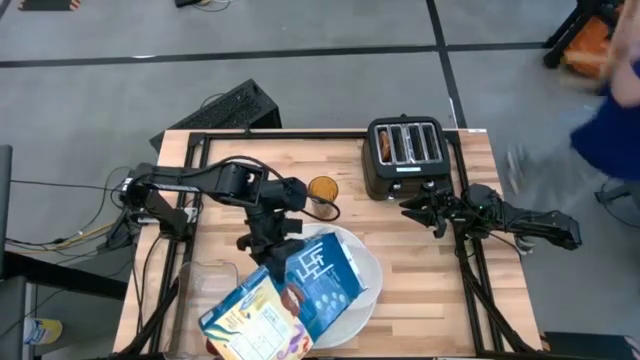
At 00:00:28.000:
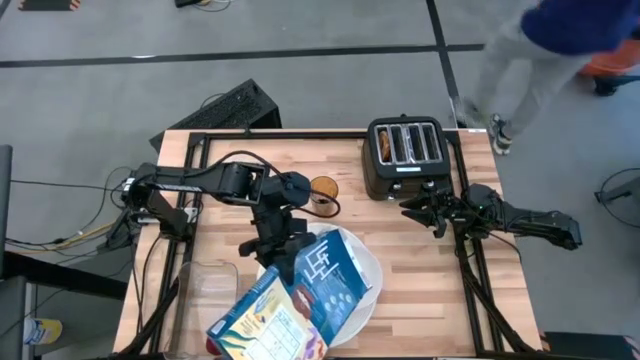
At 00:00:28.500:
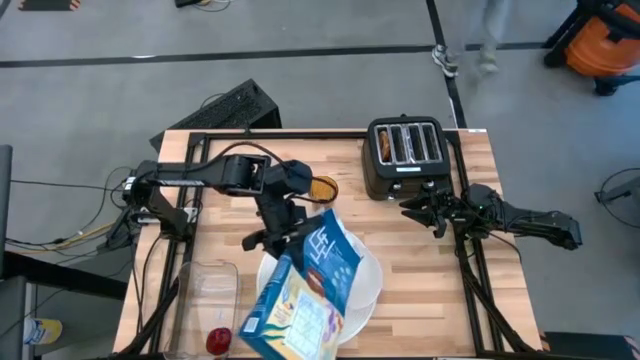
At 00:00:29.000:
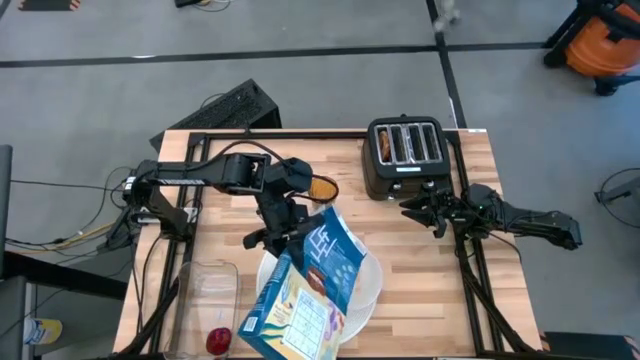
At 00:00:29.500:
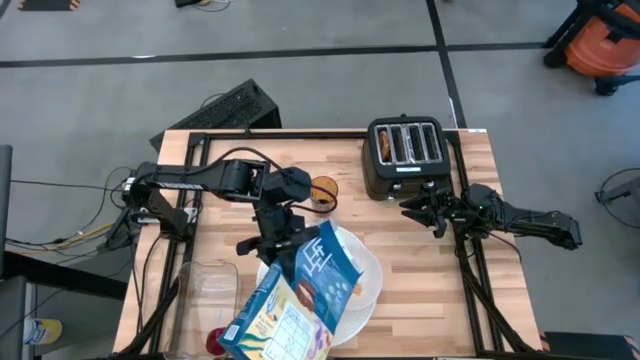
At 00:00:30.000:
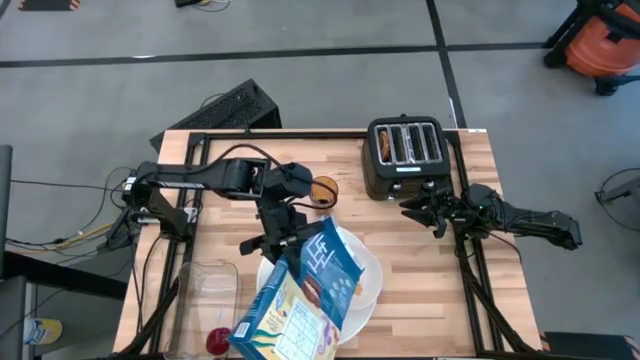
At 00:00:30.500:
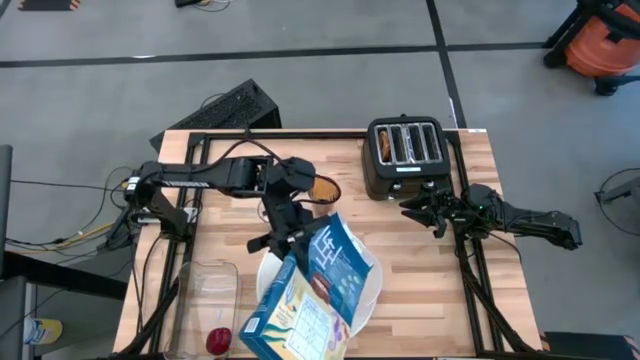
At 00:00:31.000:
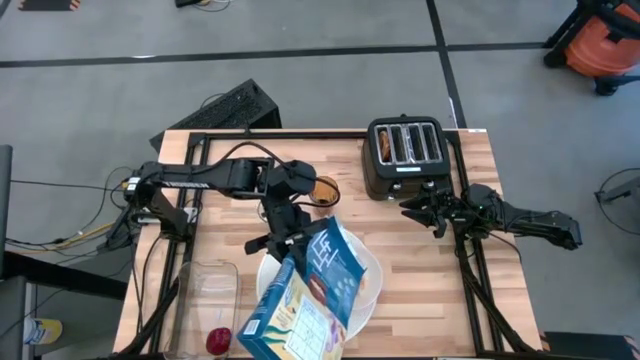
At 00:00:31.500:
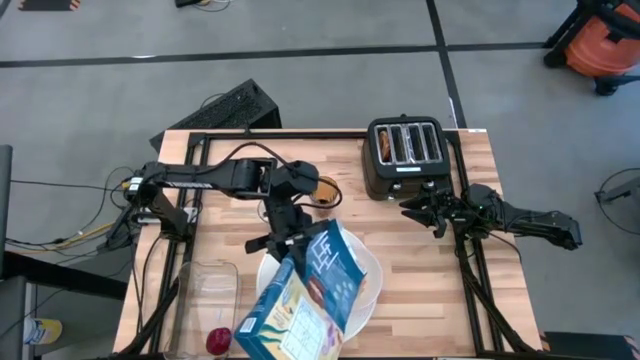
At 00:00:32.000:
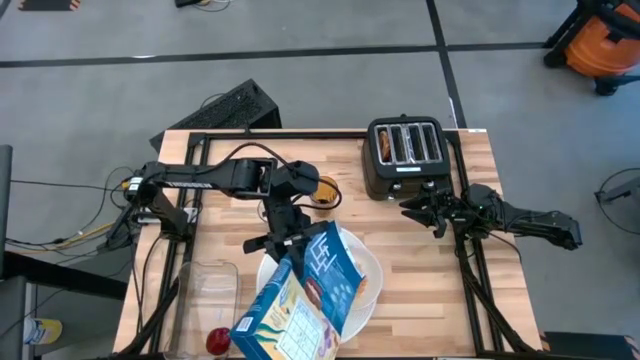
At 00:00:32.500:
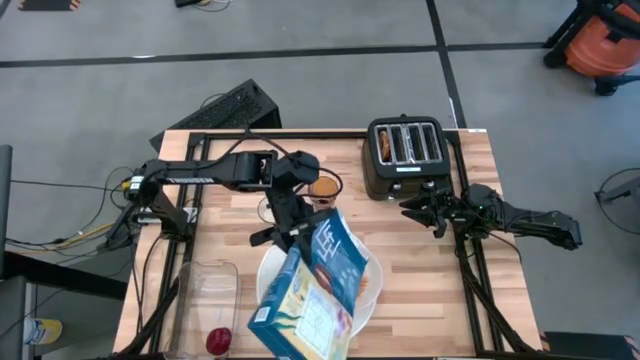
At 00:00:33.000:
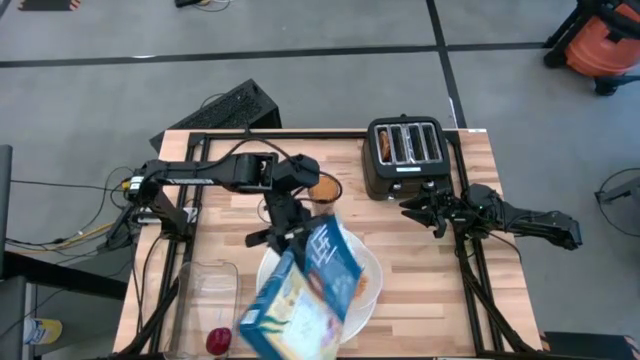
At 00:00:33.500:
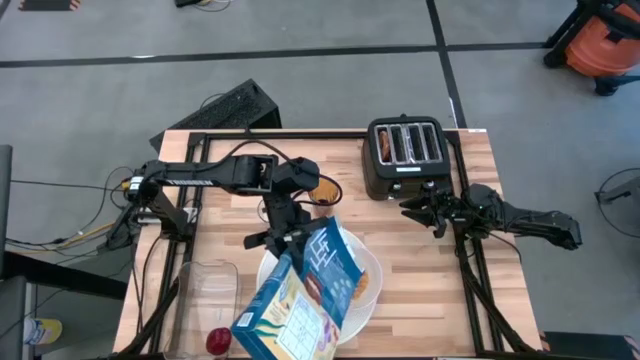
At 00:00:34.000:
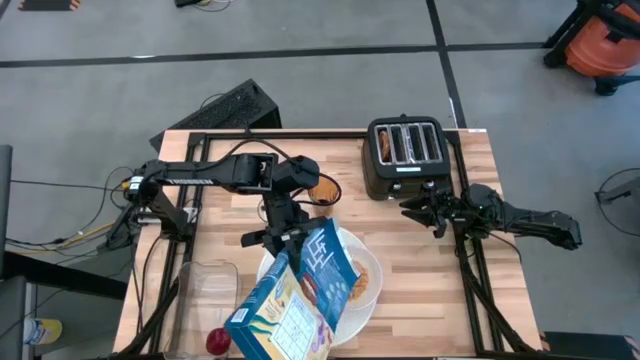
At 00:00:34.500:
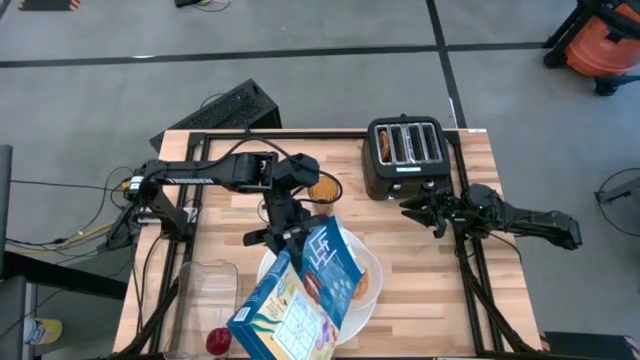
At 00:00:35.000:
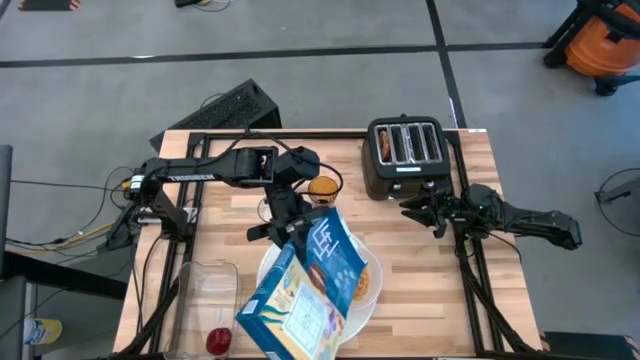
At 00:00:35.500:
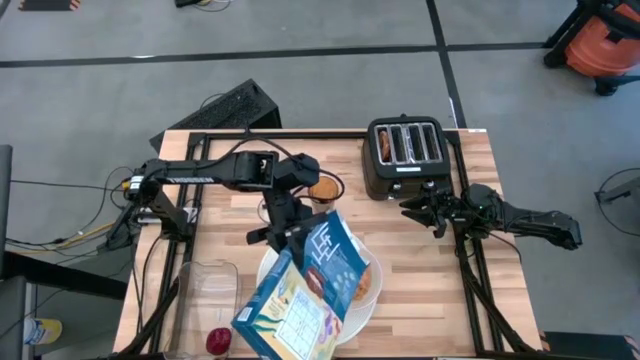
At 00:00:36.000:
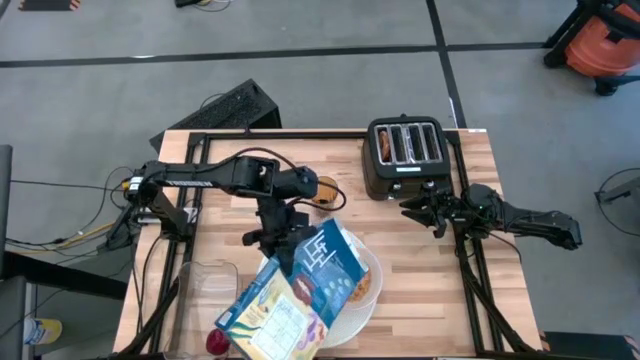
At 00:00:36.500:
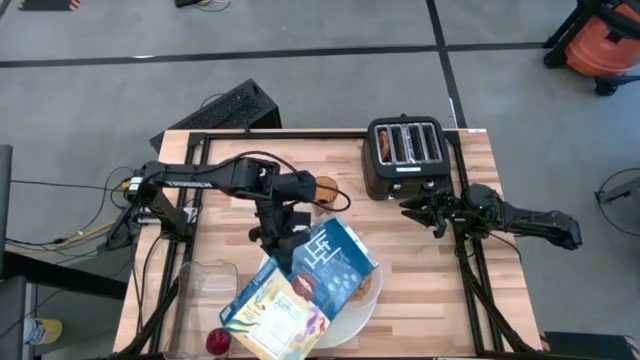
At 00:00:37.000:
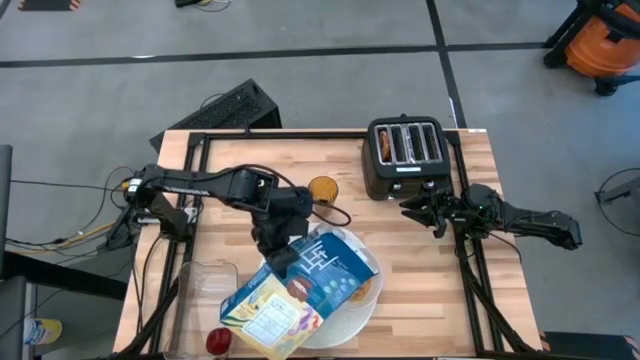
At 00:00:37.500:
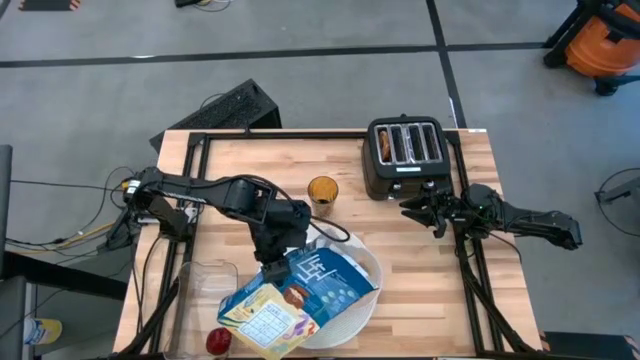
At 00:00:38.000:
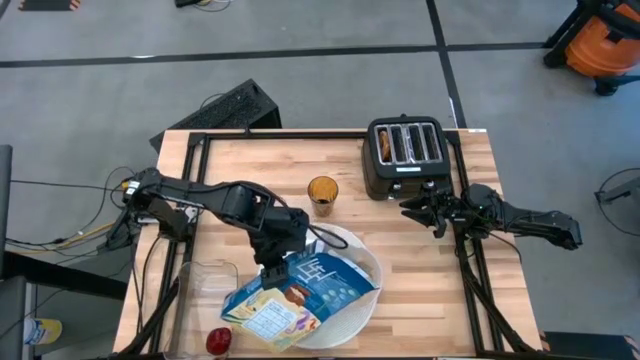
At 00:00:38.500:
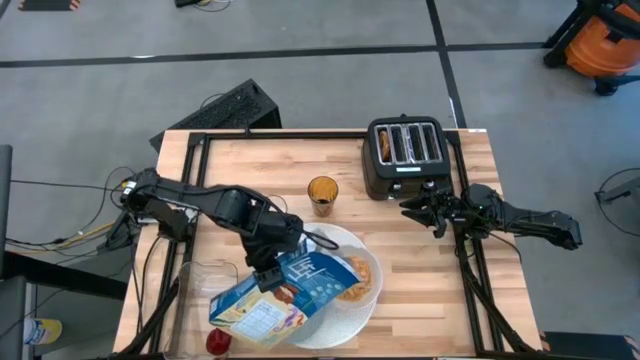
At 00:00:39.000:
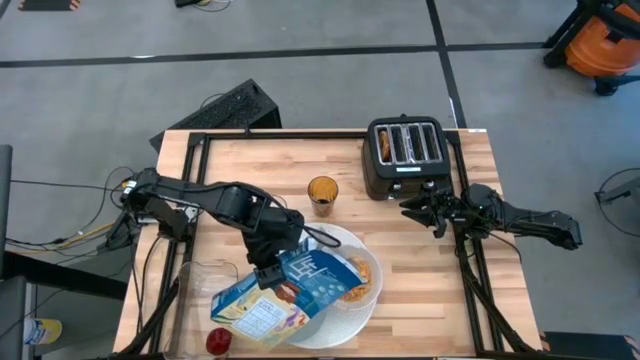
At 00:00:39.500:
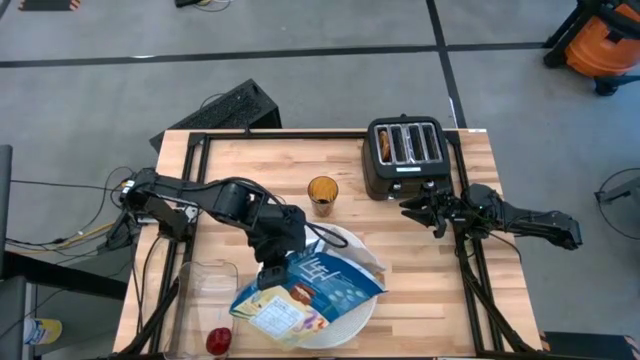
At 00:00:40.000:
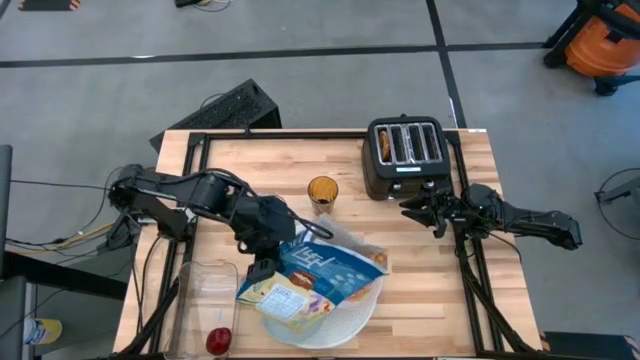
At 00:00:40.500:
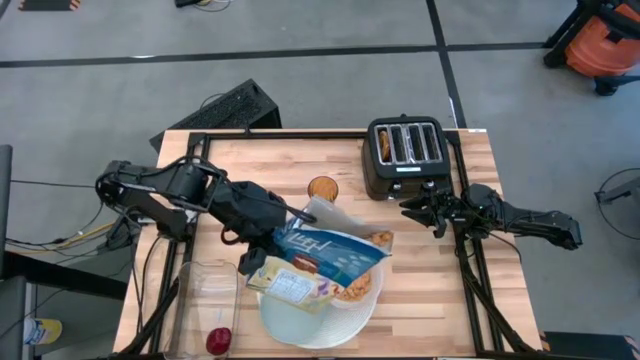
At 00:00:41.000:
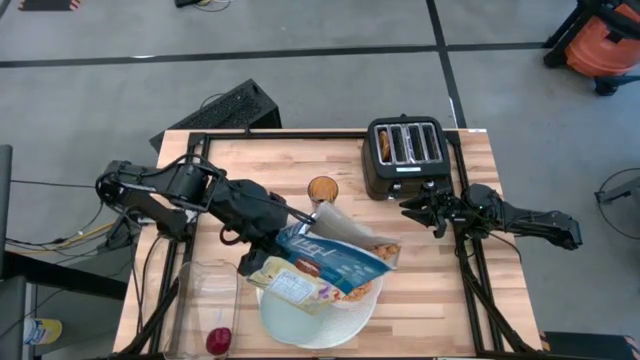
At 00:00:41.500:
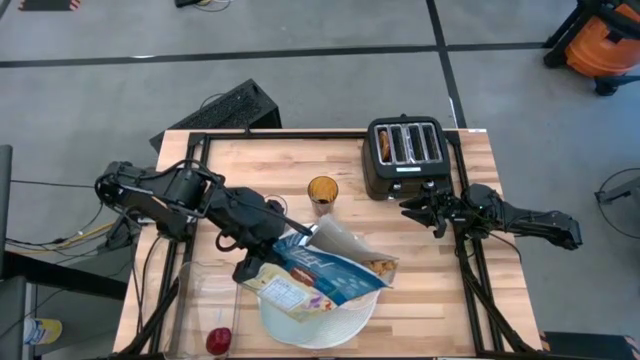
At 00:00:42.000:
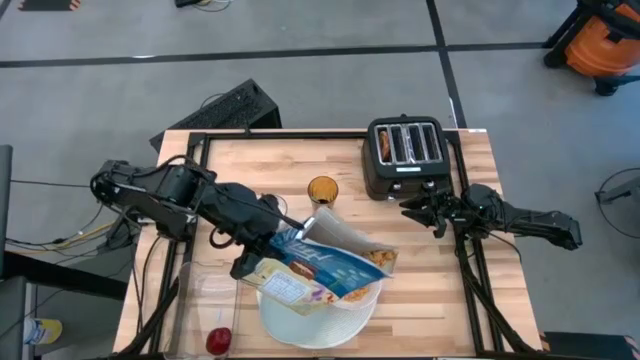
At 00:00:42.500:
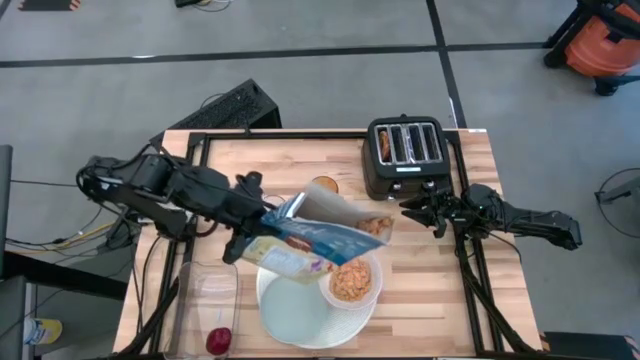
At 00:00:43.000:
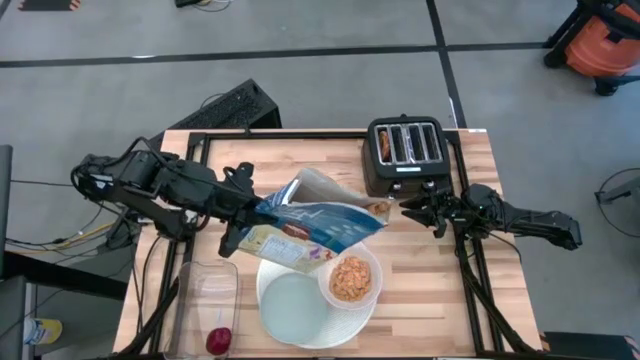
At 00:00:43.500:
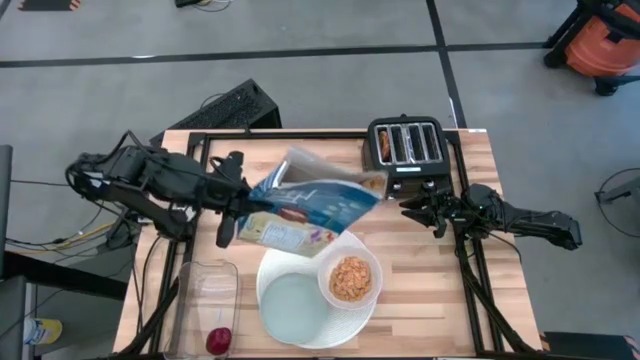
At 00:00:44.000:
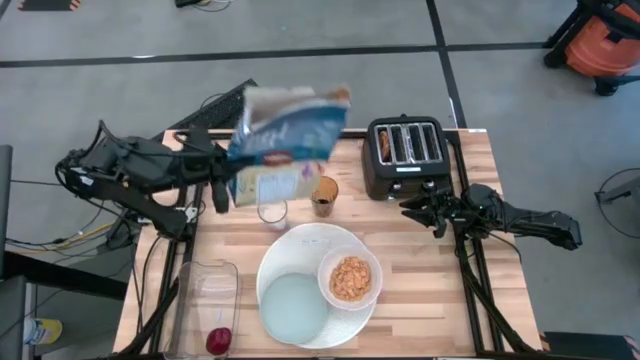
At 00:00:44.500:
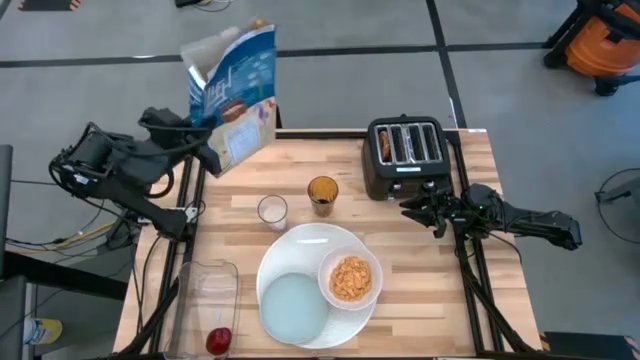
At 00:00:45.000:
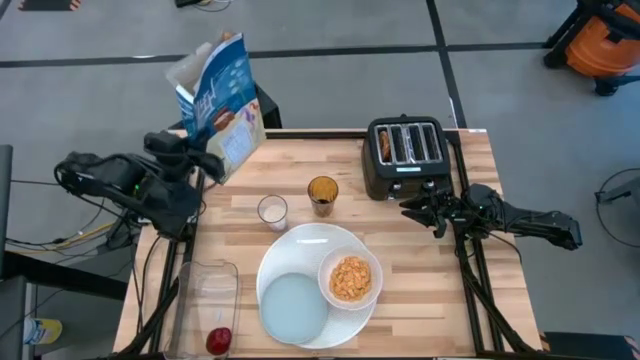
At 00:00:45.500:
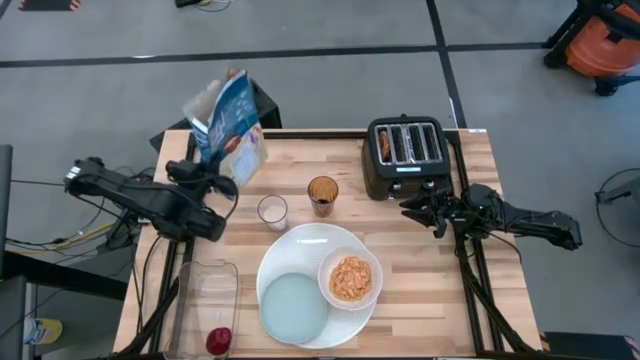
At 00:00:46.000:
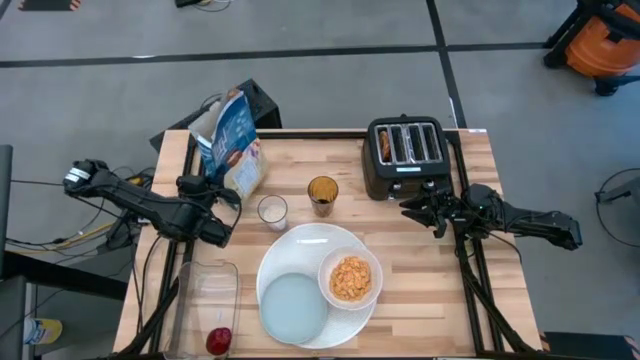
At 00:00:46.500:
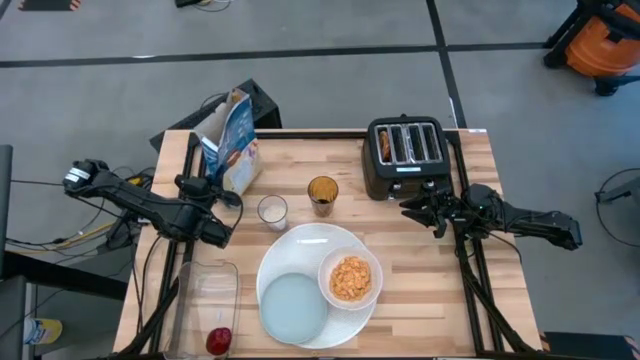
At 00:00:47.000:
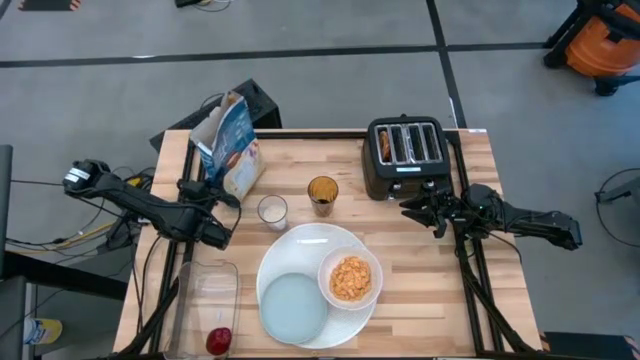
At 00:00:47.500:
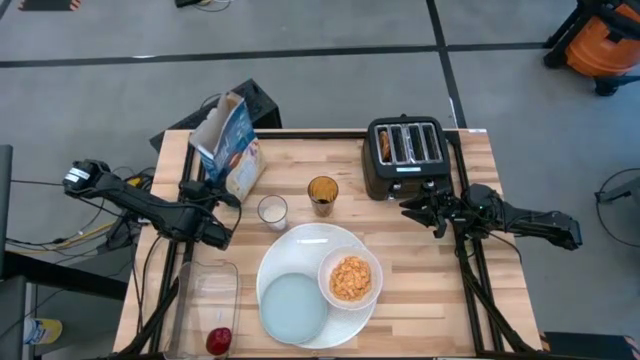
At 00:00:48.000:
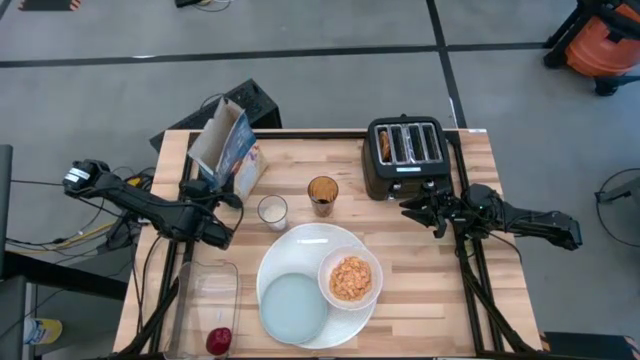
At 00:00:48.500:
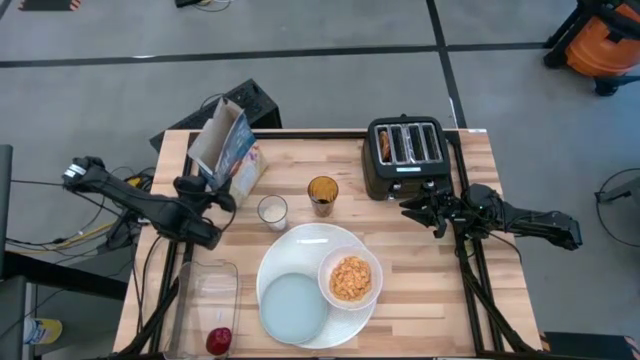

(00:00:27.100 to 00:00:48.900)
Task: Arrange a breakfast setting
Pour the cereal into the white bowl
